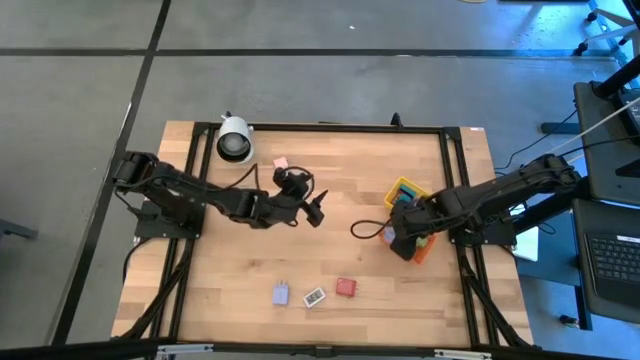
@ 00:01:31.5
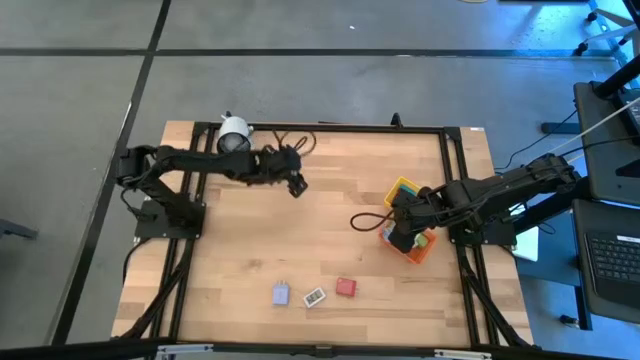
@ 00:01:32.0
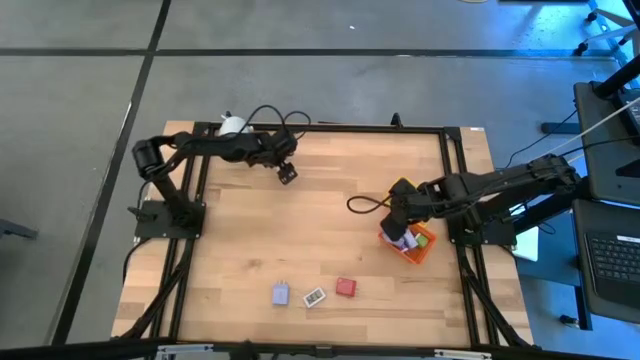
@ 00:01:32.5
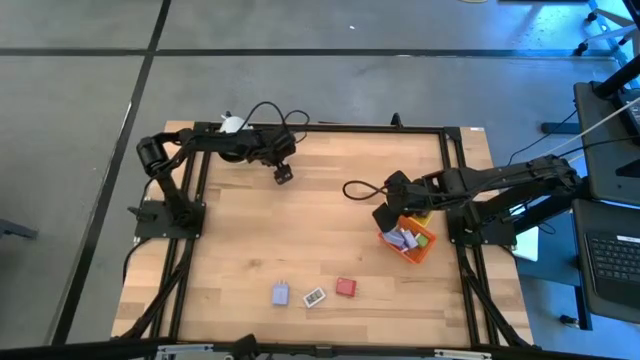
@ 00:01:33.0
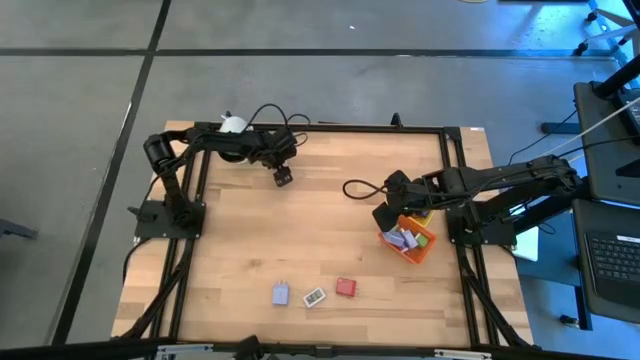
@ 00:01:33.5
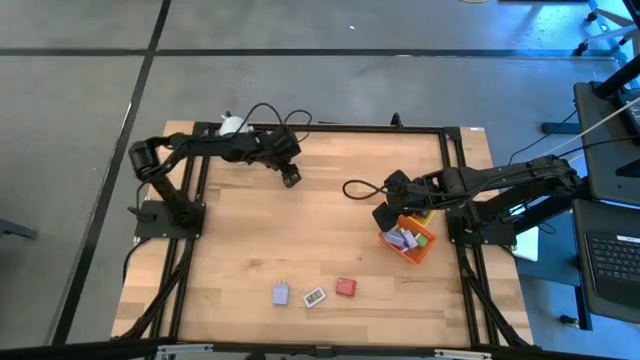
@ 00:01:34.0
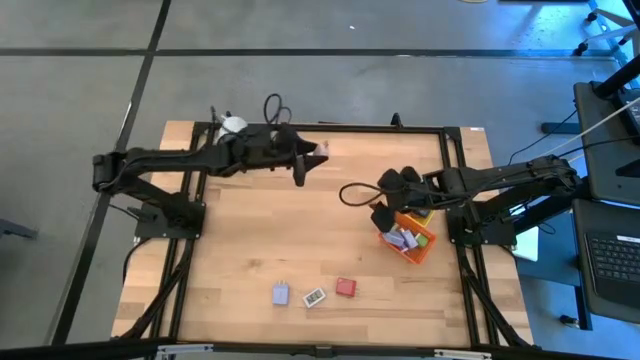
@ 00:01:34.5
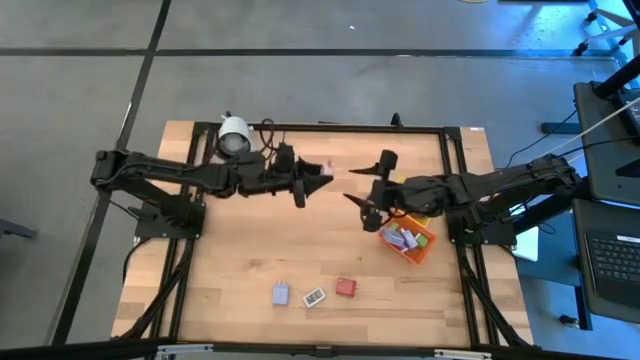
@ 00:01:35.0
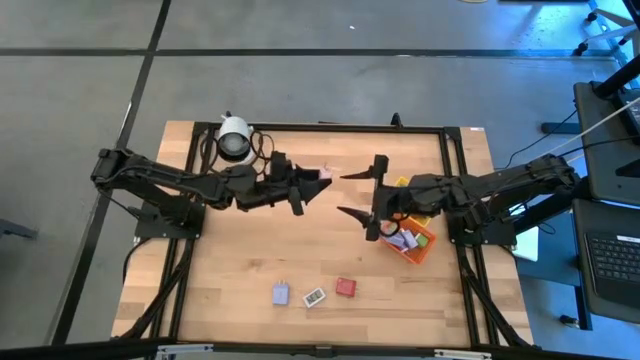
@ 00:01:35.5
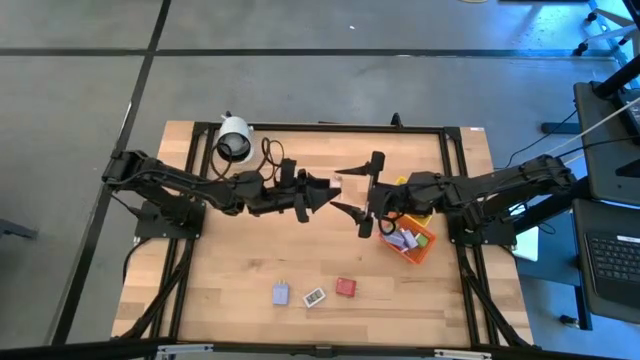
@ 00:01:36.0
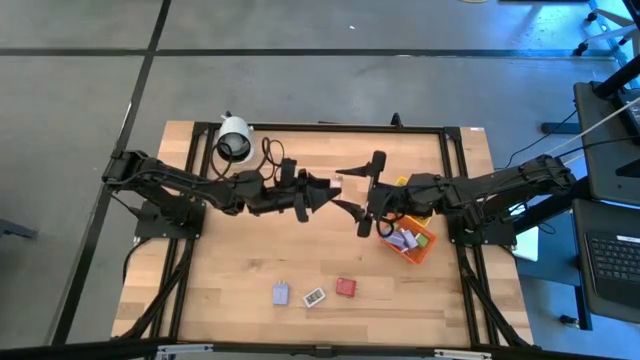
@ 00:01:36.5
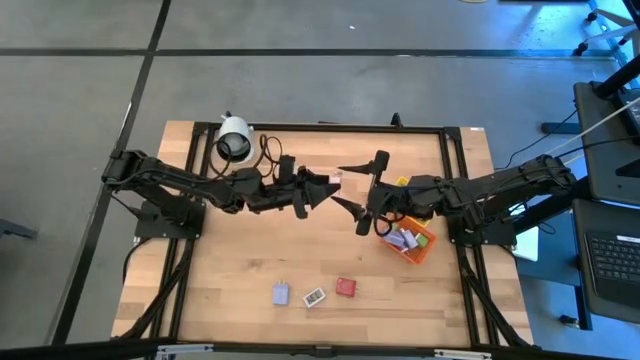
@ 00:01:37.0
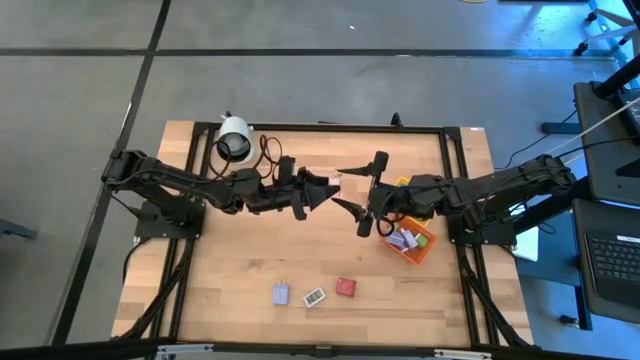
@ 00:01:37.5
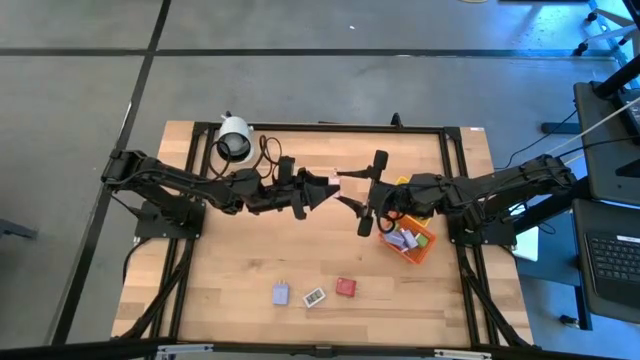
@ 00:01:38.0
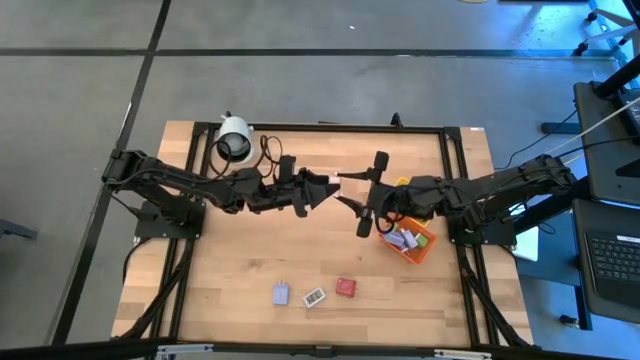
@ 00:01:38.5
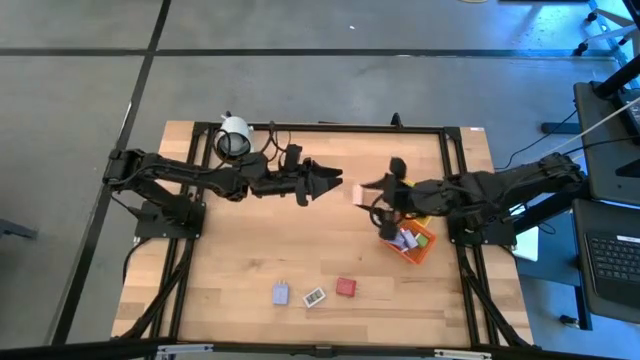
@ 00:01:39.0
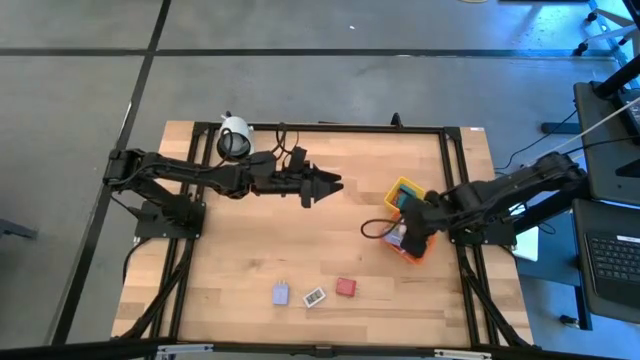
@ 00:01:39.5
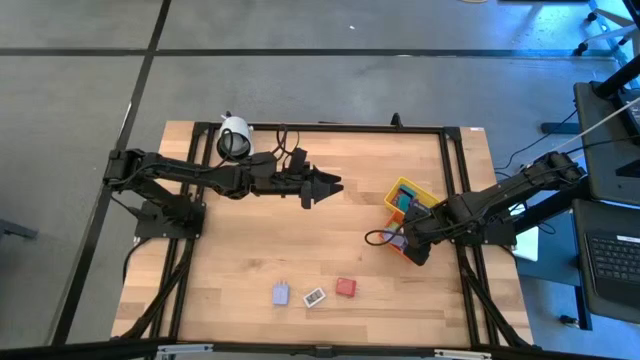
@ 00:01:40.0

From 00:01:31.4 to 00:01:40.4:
Task: Pick & Place Office items
Put the white charger adapter into the orange basket

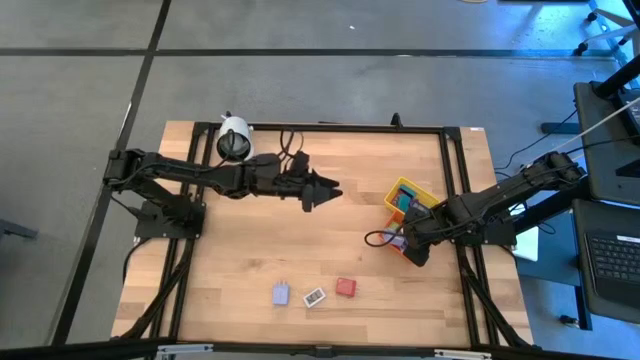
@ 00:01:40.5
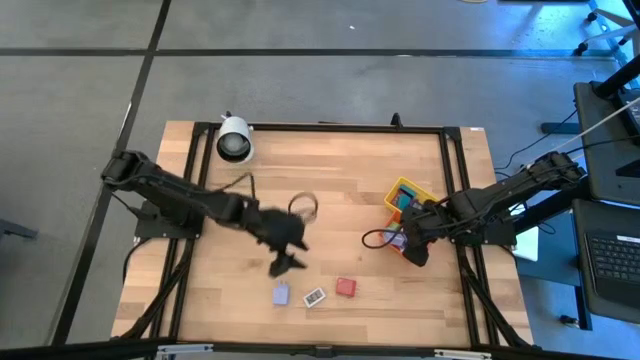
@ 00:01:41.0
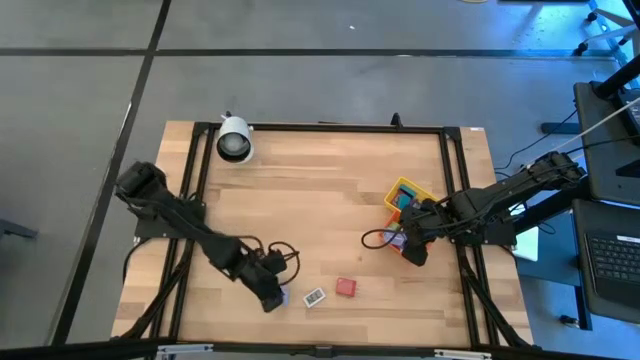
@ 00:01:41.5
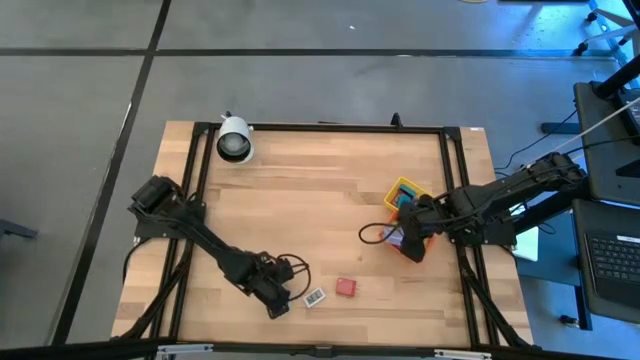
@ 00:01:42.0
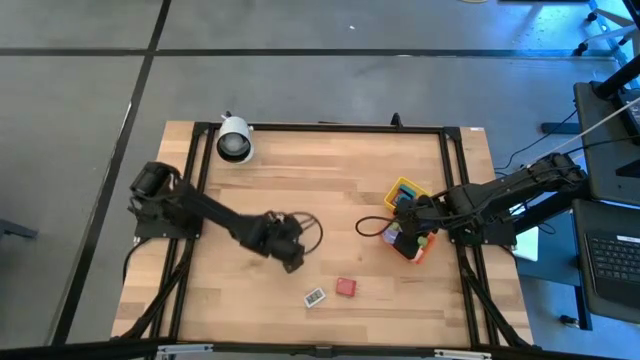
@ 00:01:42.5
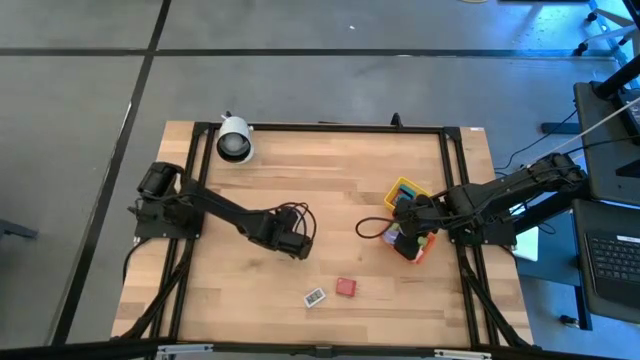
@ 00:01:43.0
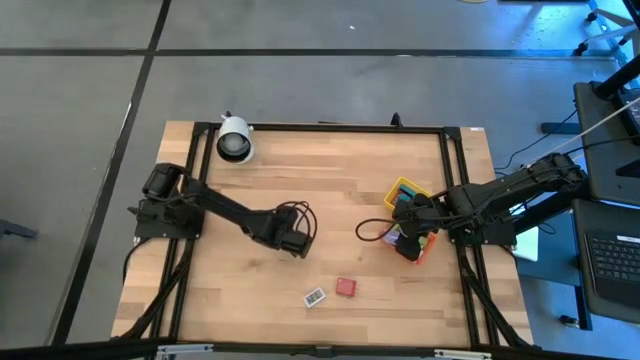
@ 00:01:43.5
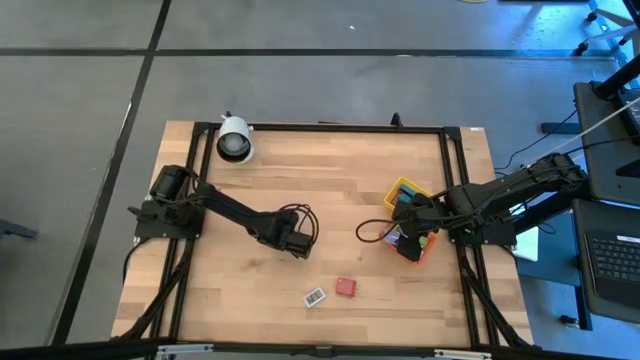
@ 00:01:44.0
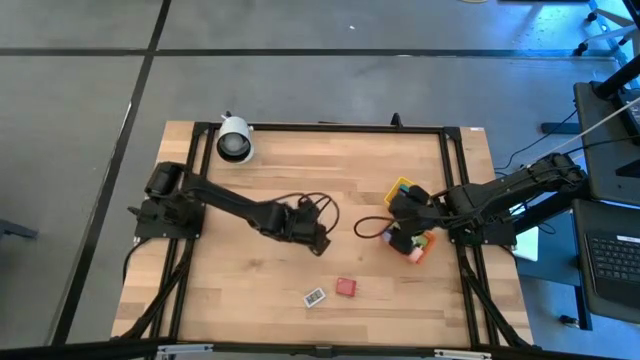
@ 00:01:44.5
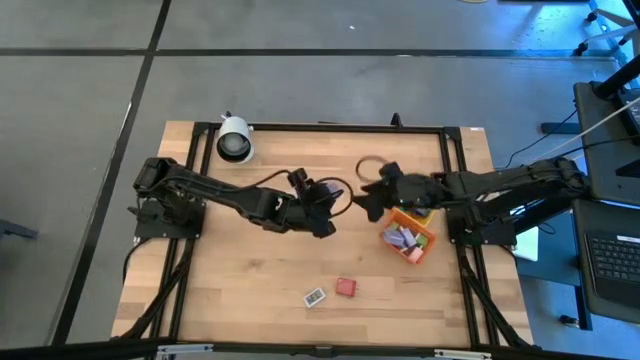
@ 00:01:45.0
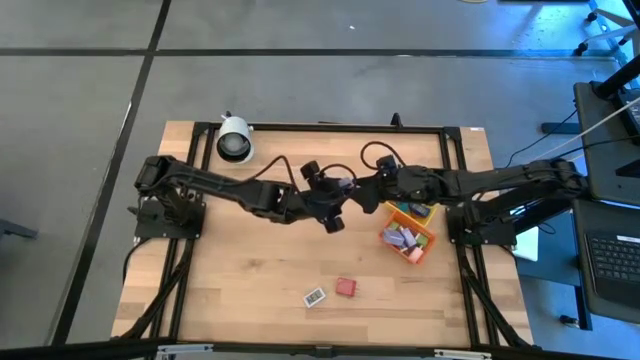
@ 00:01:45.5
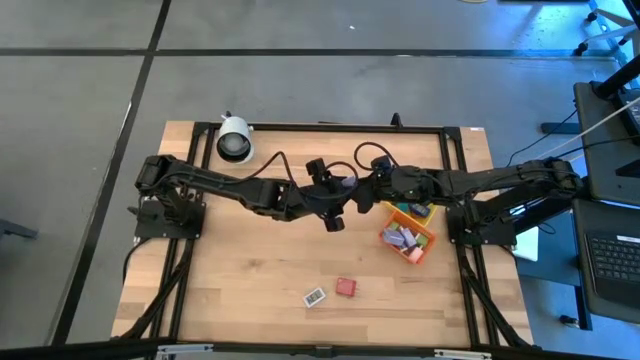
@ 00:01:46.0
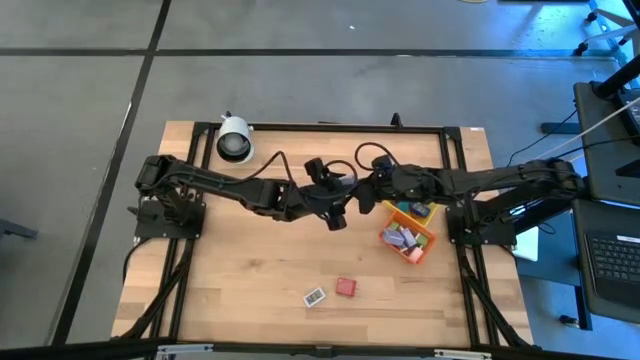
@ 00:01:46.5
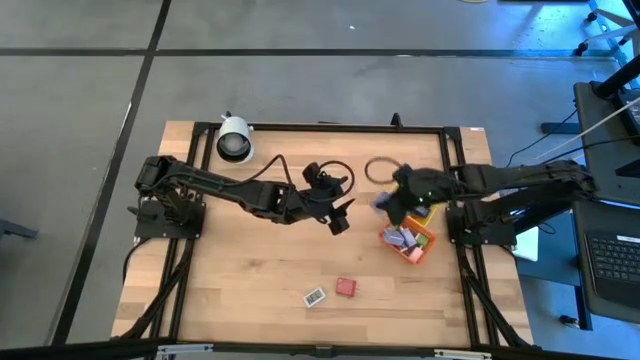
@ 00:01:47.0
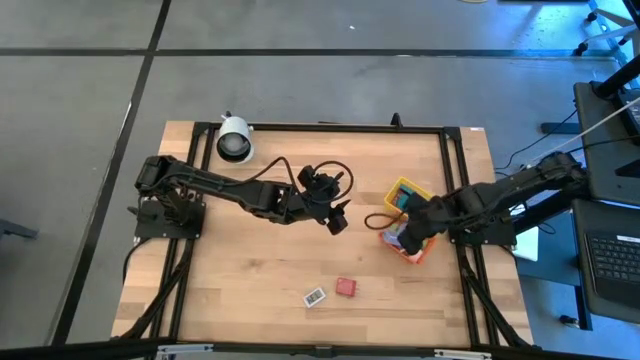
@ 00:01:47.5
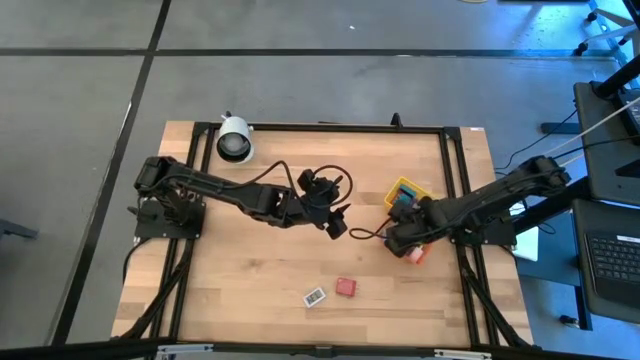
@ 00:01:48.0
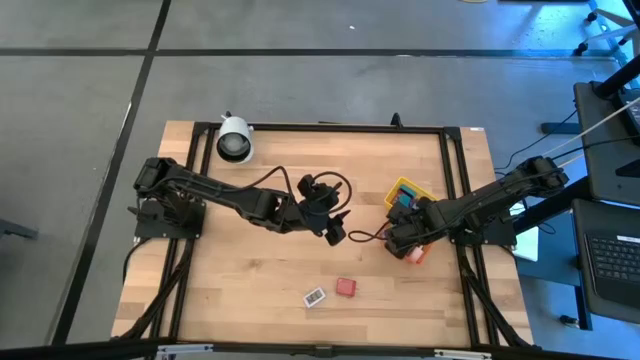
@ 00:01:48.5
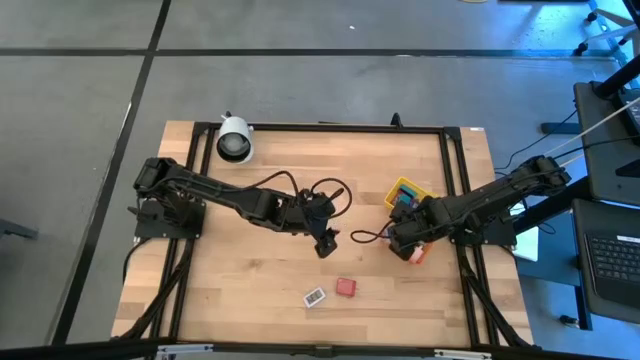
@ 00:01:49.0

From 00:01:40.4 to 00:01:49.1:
Put the light blue charger adapter into the orange basket

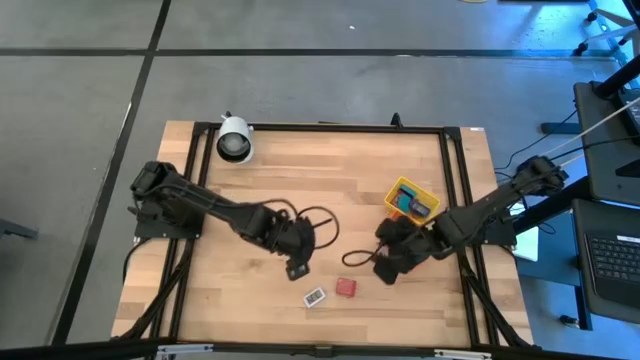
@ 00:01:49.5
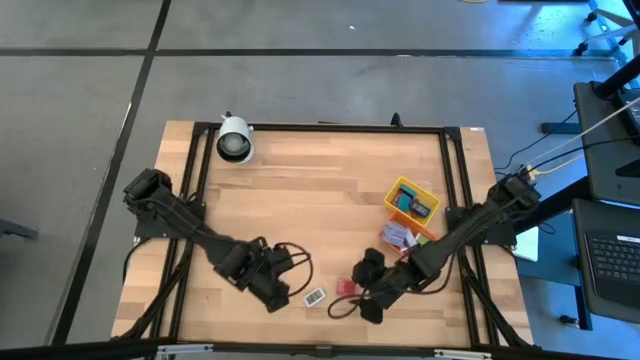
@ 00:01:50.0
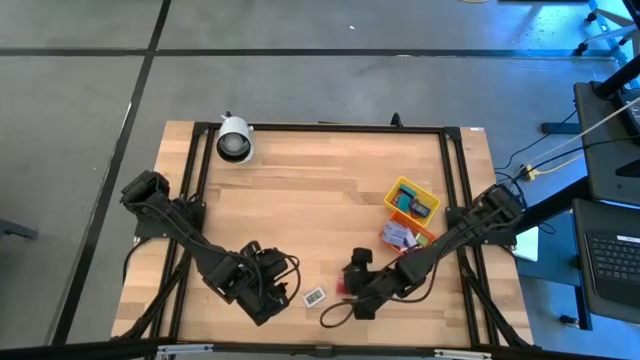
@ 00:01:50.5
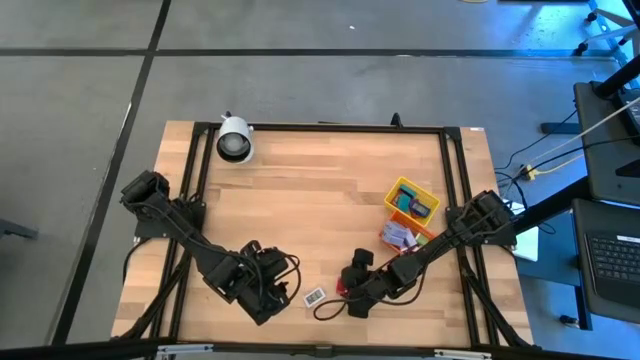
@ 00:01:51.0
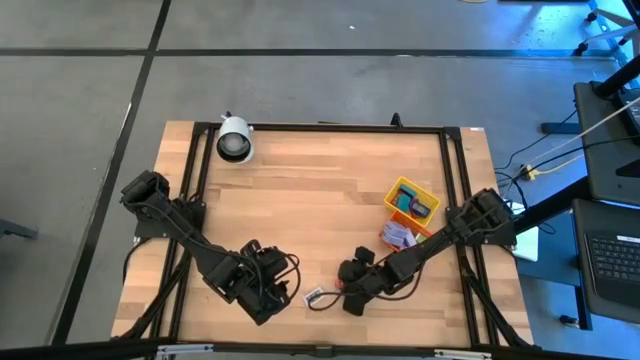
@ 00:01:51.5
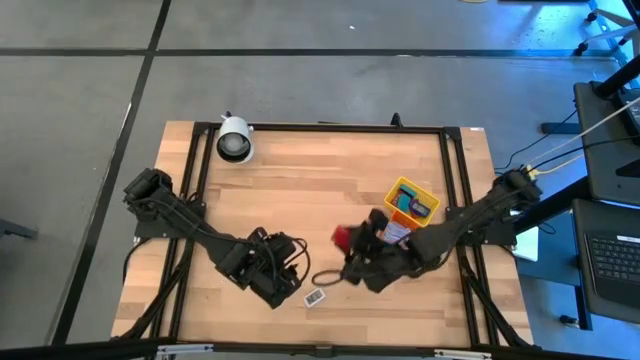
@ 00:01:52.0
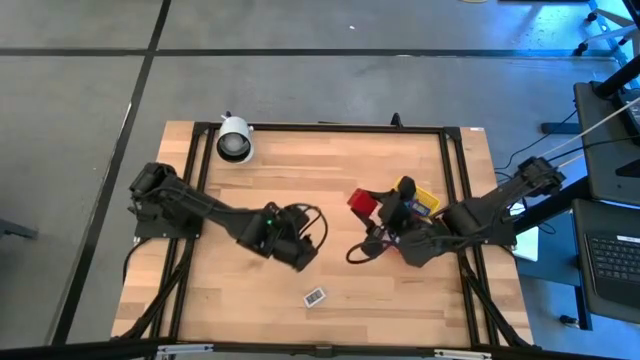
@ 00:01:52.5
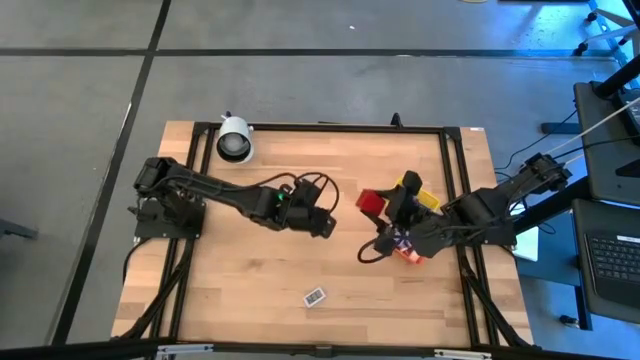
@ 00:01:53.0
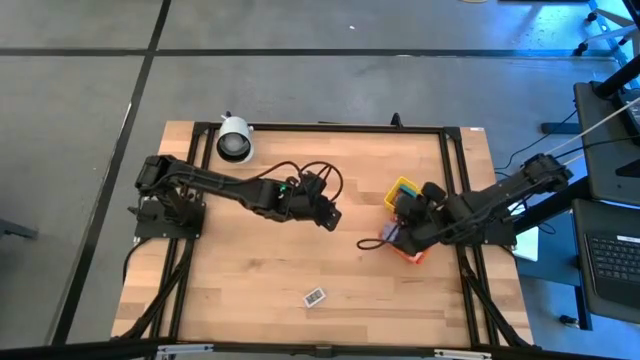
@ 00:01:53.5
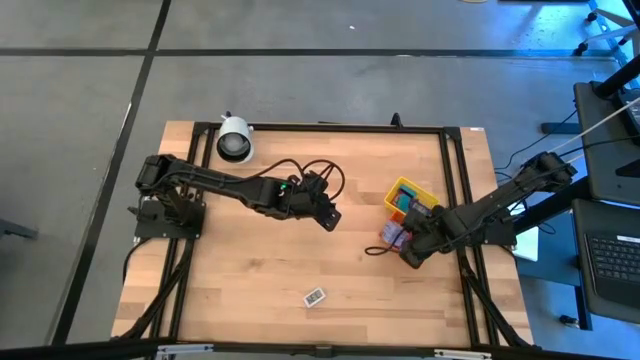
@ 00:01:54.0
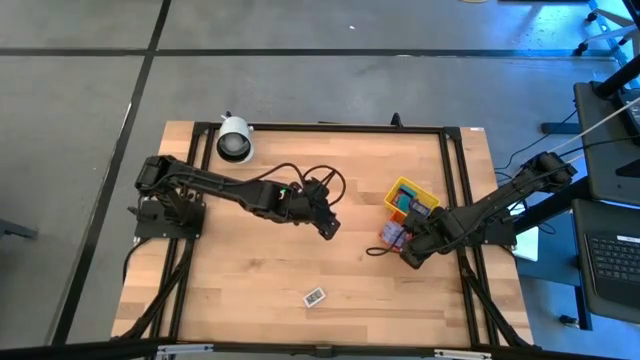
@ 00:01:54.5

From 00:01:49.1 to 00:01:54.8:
Put the red charger adapter into the orange basket
